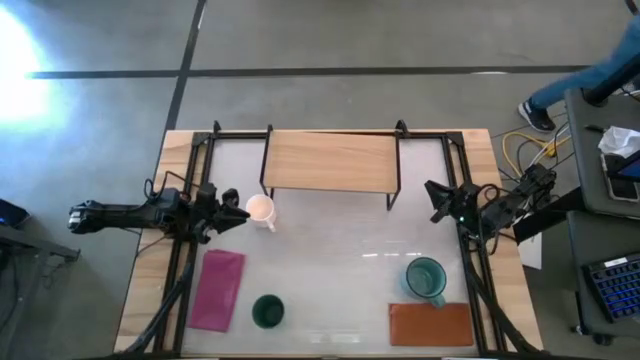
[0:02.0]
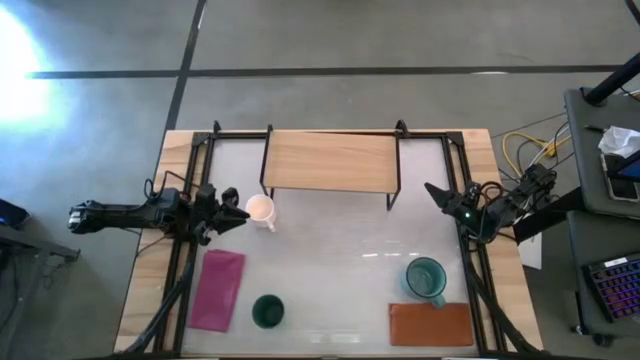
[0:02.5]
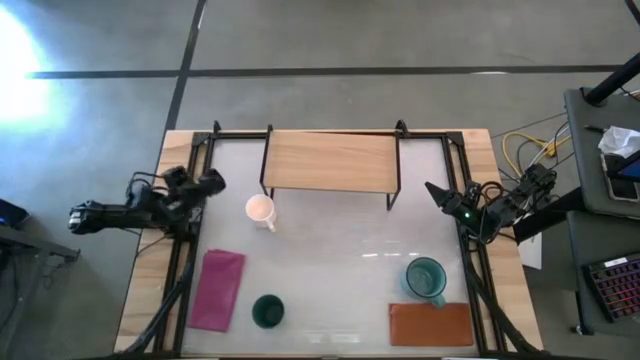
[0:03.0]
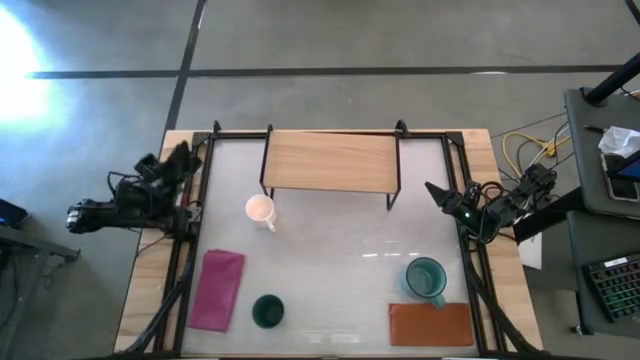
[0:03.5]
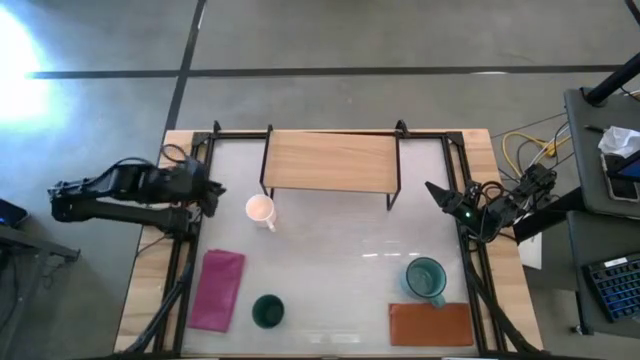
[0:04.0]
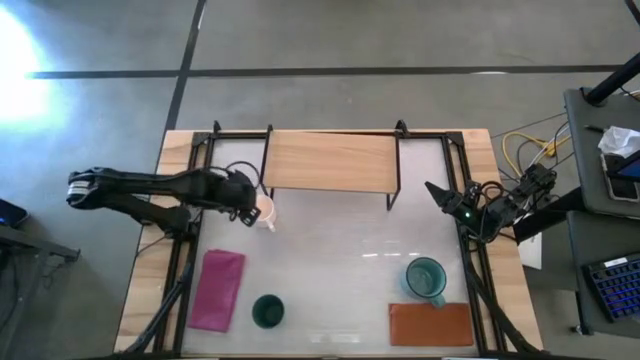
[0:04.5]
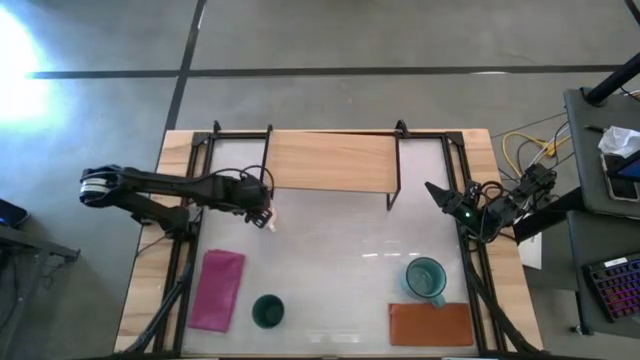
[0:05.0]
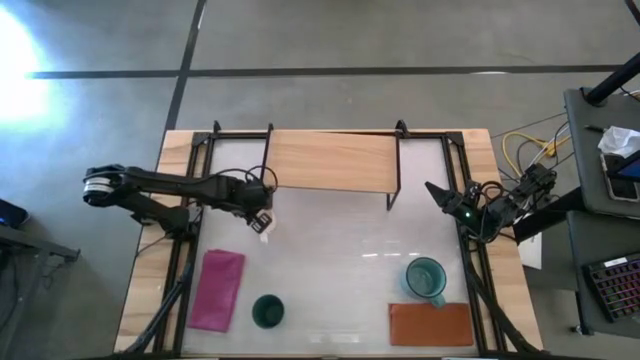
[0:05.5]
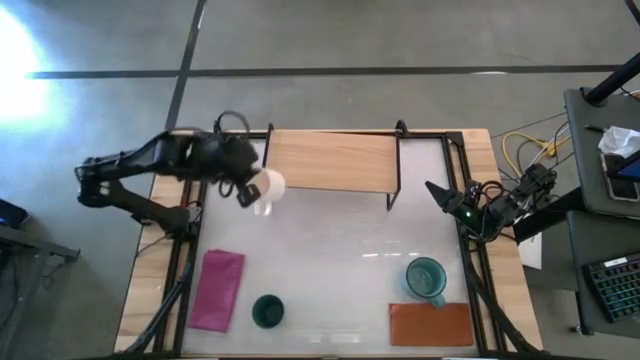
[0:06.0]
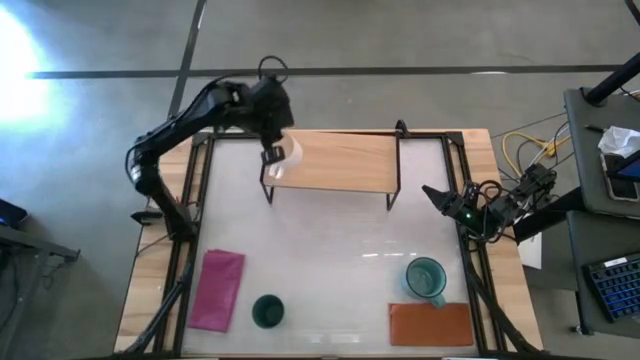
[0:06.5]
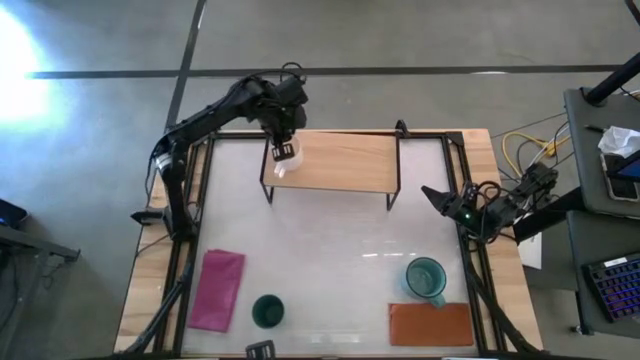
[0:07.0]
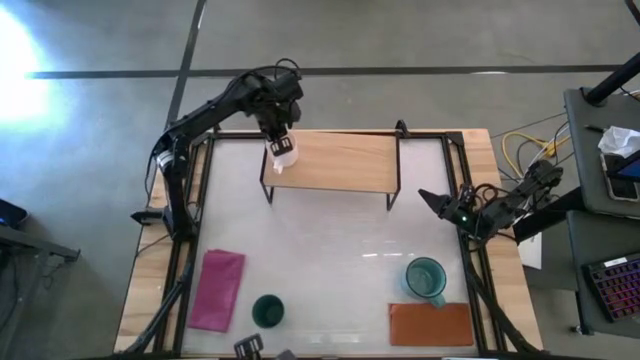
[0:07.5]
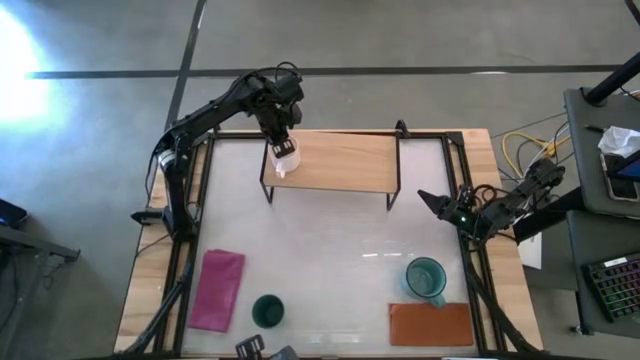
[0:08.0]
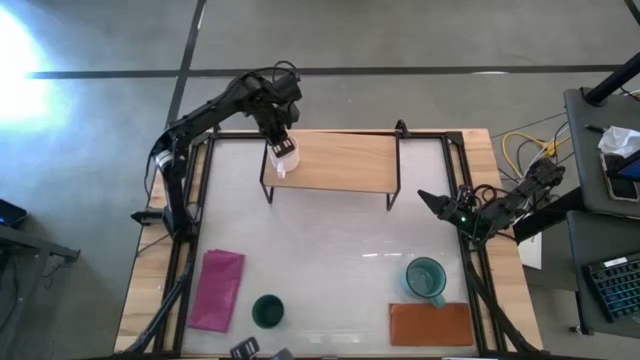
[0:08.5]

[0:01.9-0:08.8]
Task: Stack small to large cups/mugs on shelf
Put the white mug on the shelf

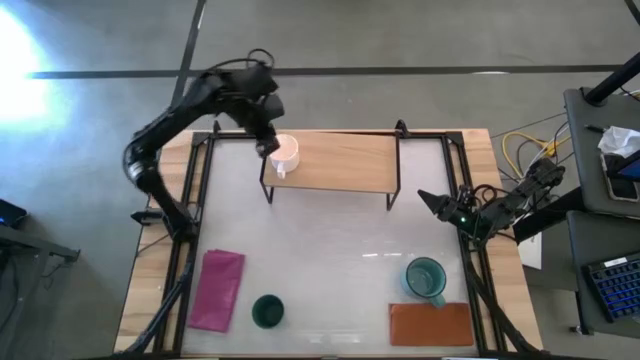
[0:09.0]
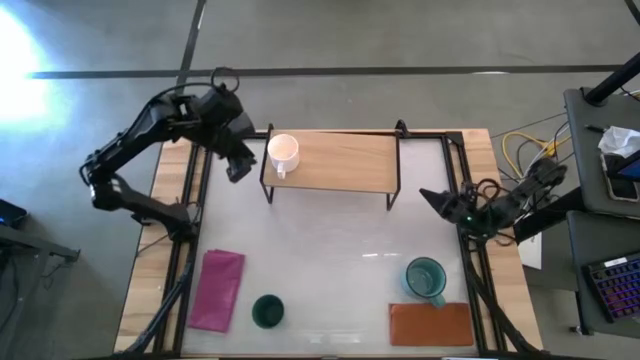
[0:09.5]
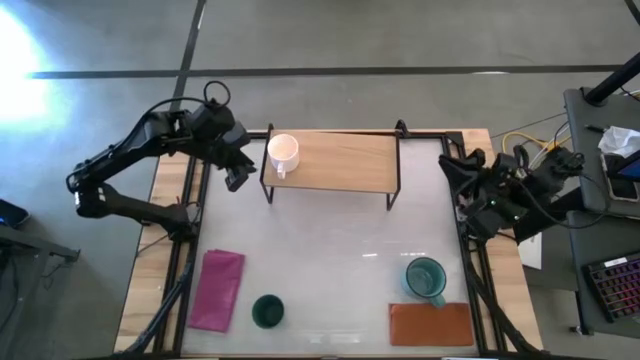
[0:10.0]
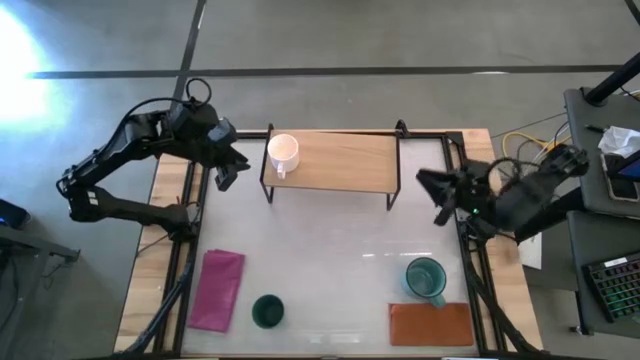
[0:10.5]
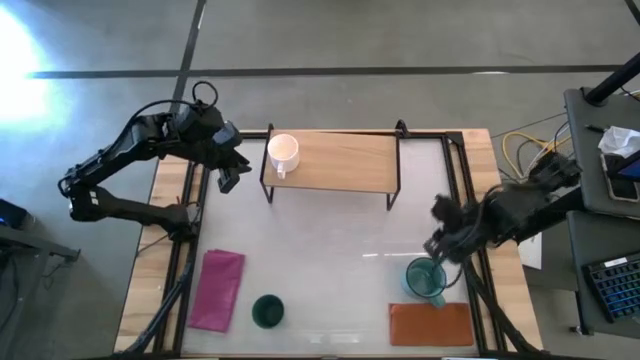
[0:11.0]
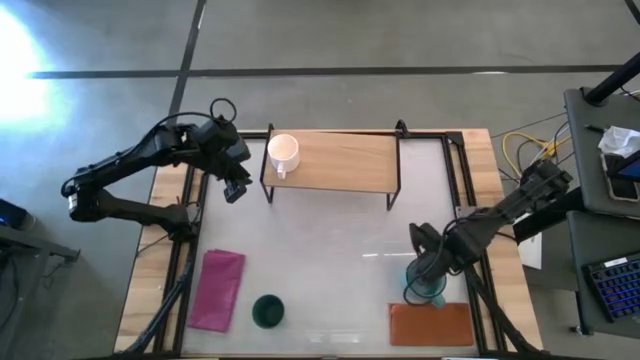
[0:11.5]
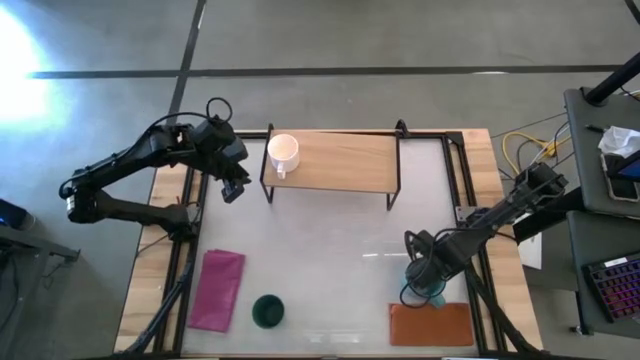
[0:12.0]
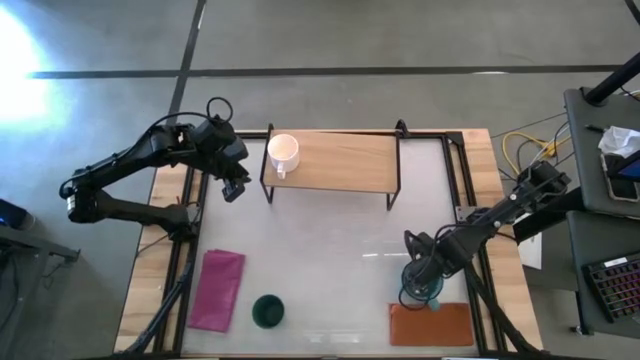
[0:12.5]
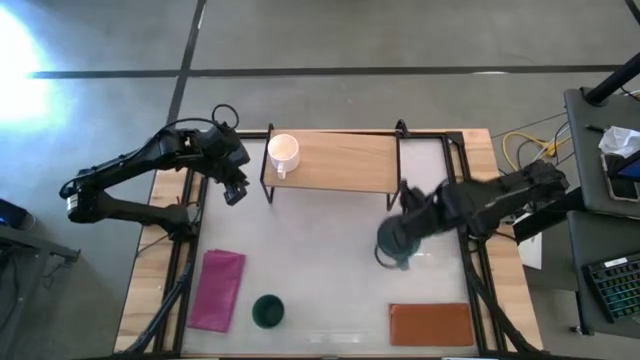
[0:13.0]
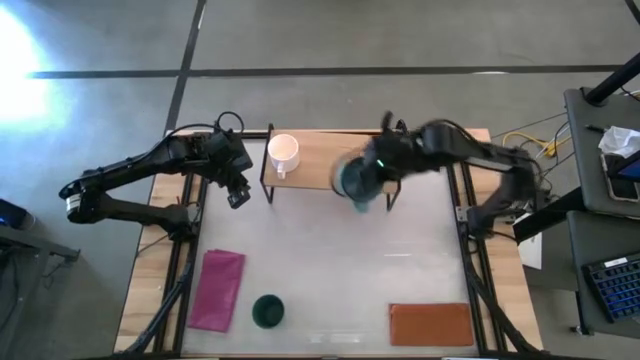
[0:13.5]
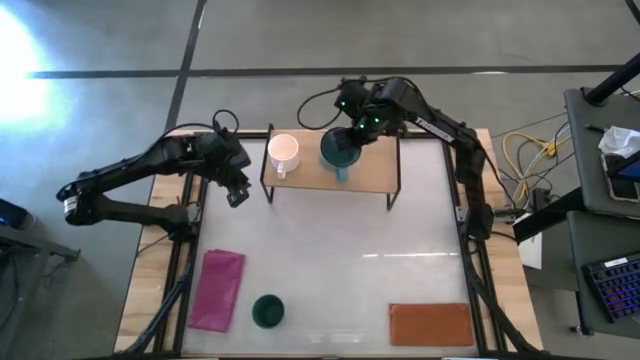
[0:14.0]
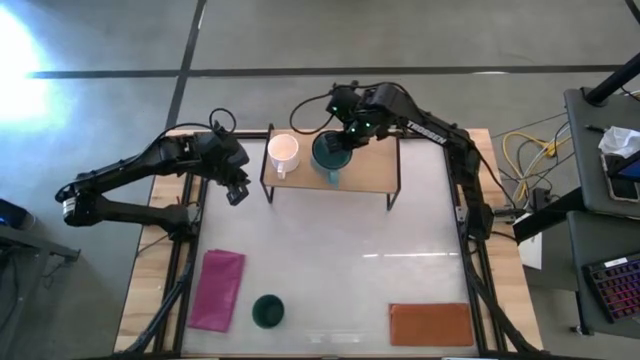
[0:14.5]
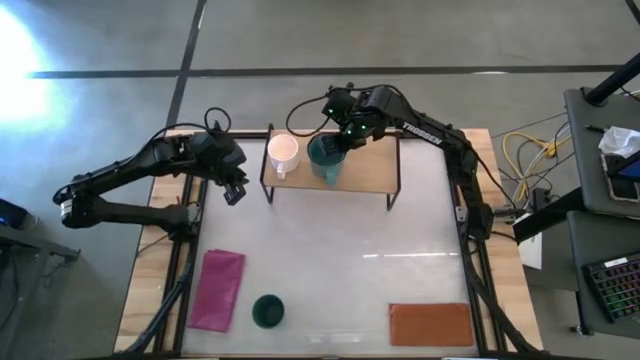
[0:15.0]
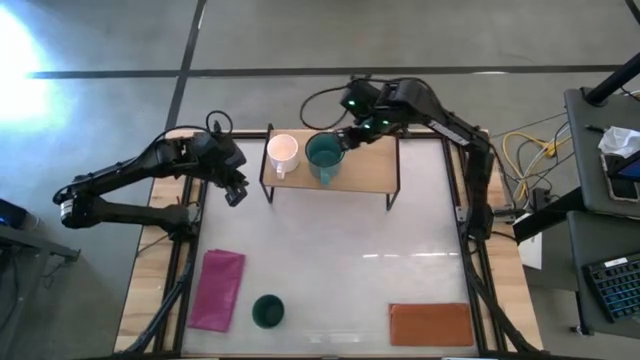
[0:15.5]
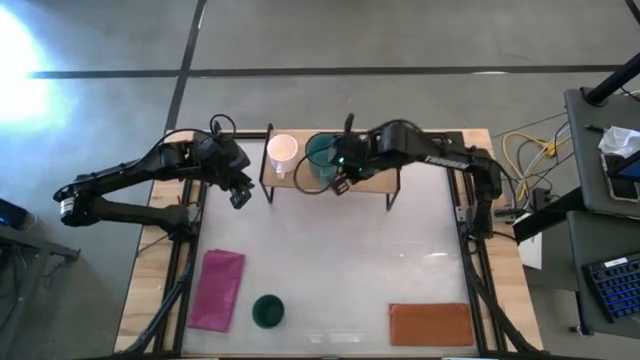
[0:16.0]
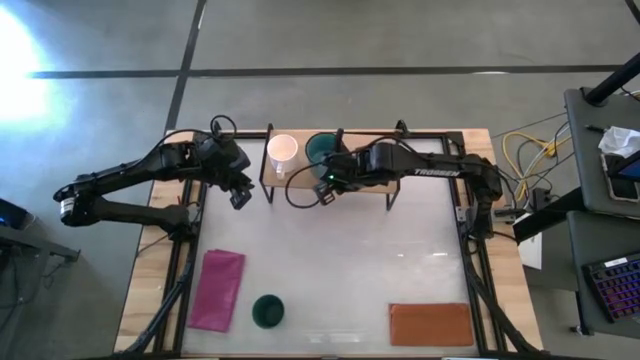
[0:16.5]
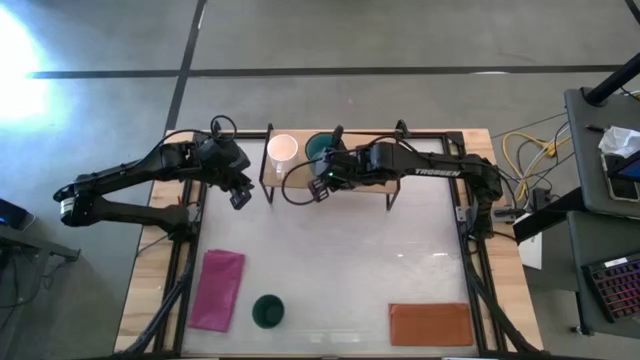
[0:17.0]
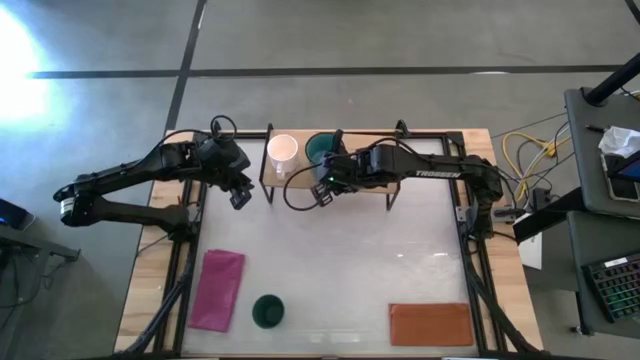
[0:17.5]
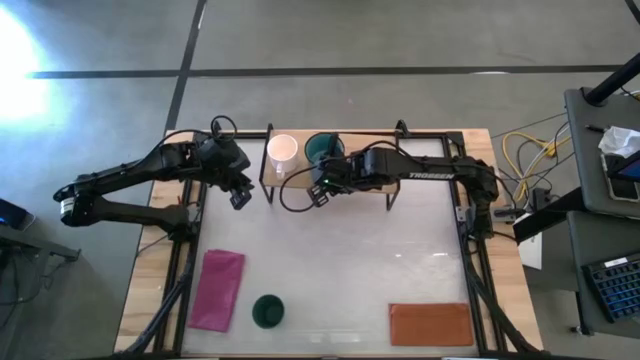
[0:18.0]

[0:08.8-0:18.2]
Put the blue mug on the shelf

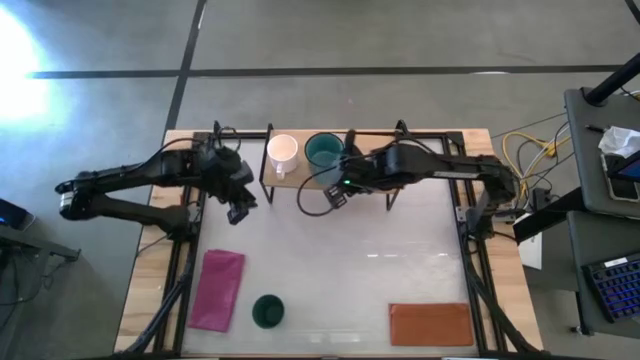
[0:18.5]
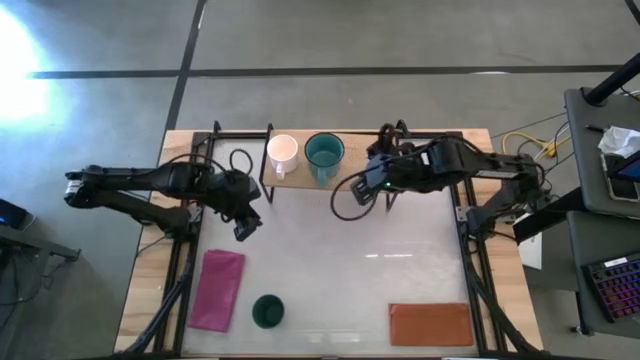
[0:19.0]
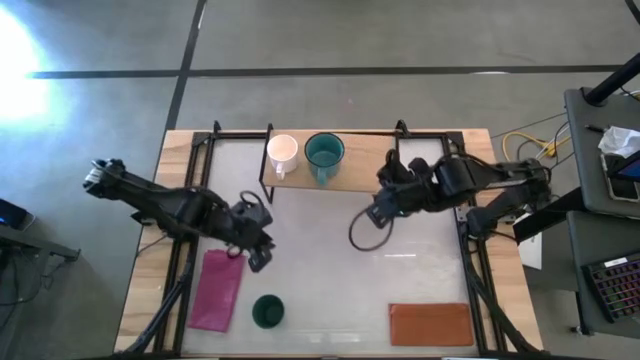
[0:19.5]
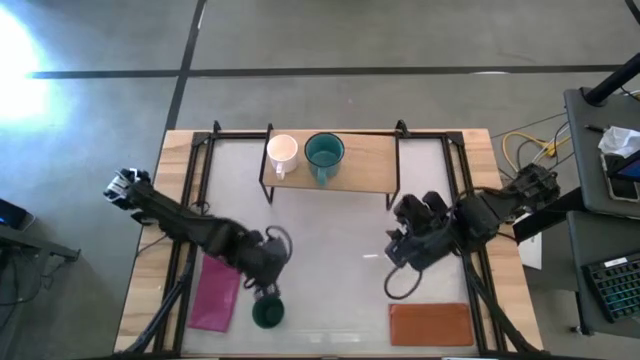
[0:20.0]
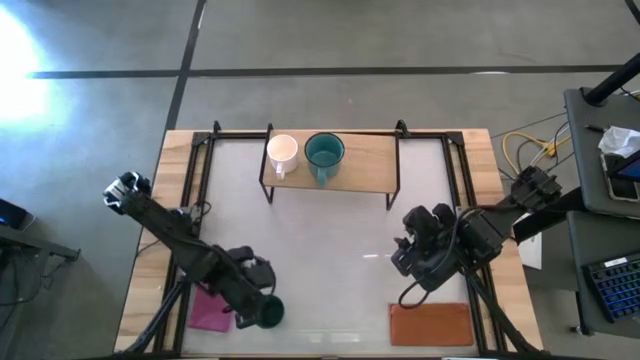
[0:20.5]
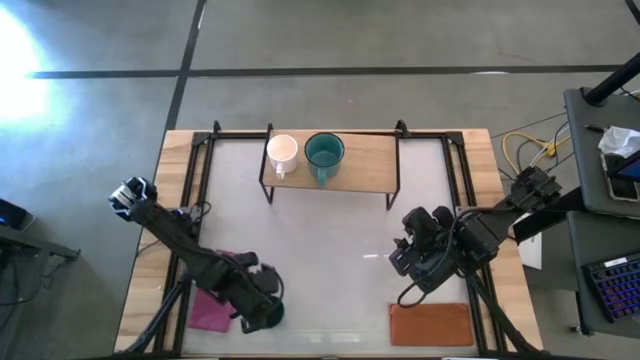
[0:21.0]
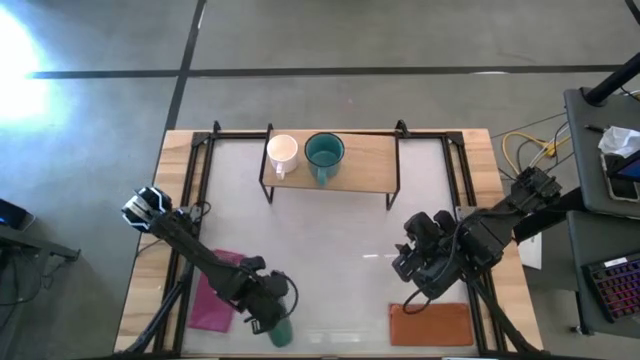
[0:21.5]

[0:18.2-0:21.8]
Put the green cup on the shelf

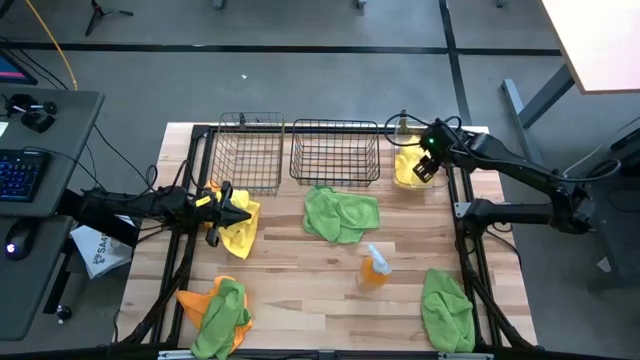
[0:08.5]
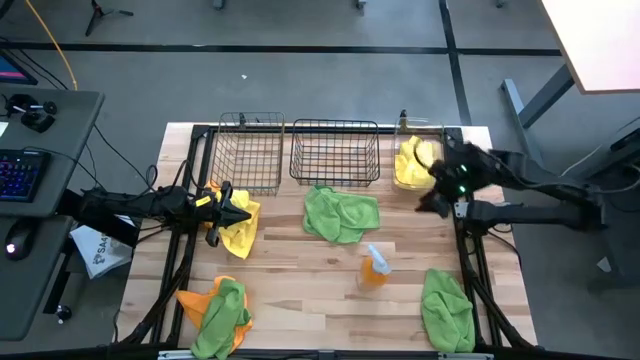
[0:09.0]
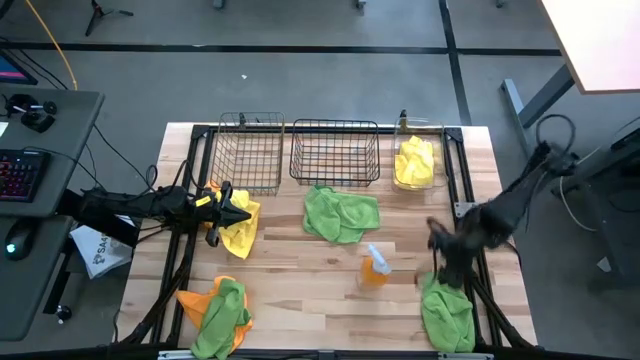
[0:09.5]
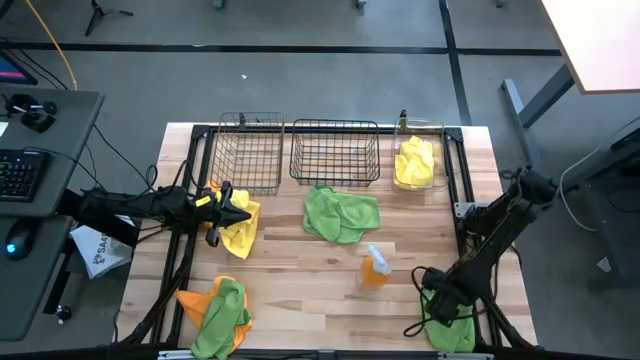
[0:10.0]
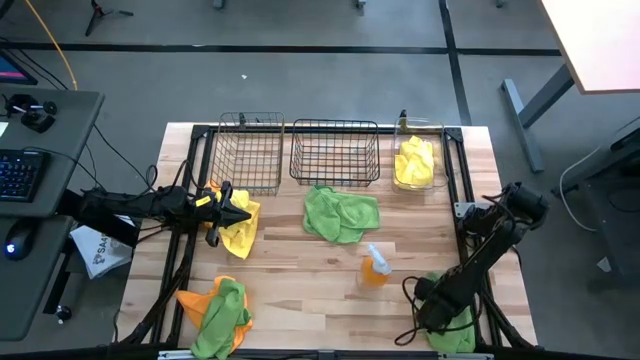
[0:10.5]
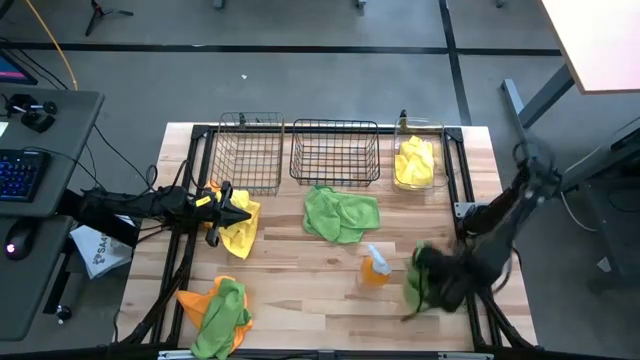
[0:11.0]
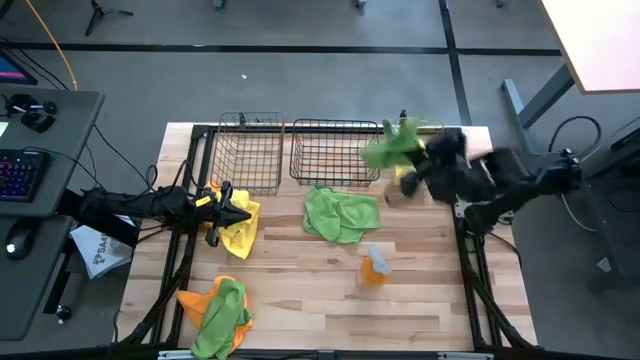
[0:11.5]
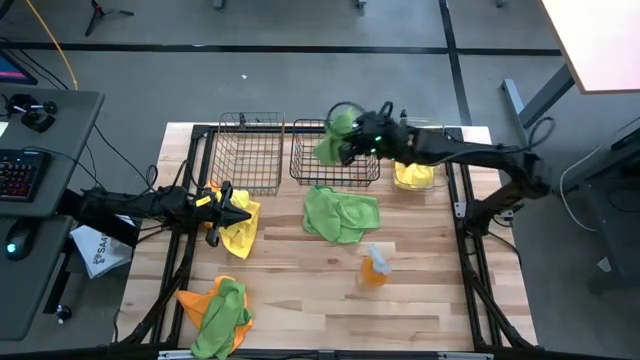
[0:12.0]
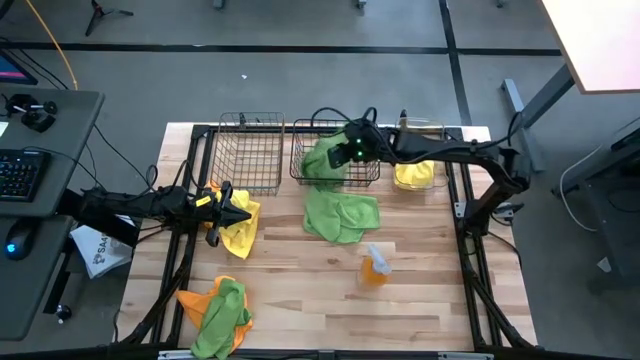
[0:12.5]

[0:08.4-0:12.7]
Task: Sort microfiber towel by color & place in baskets
Put the bottom right green microfiber towel into the black wire basket
